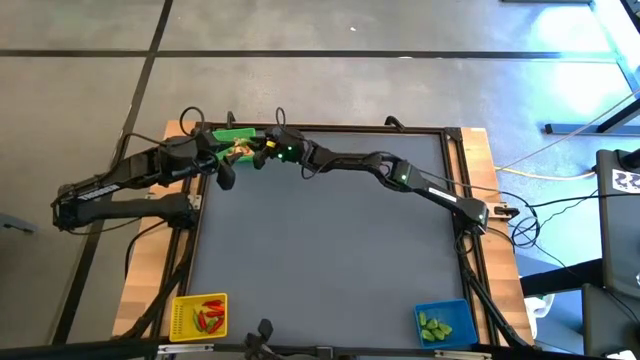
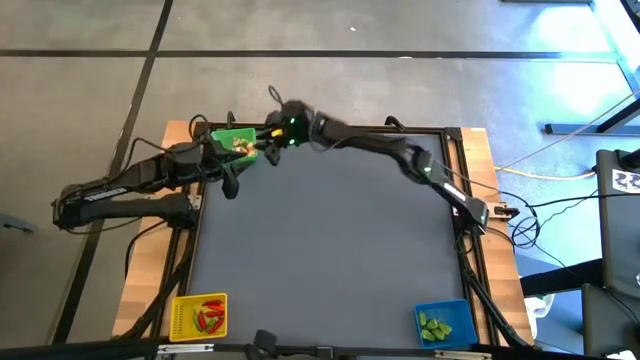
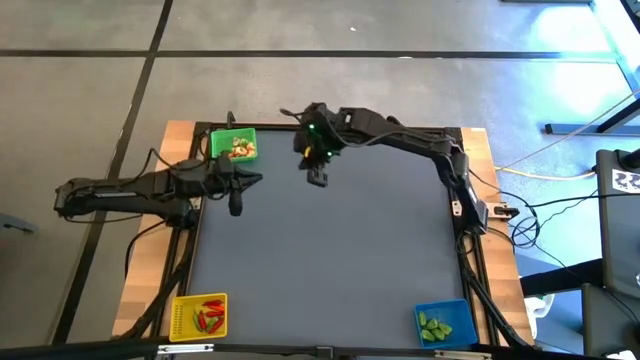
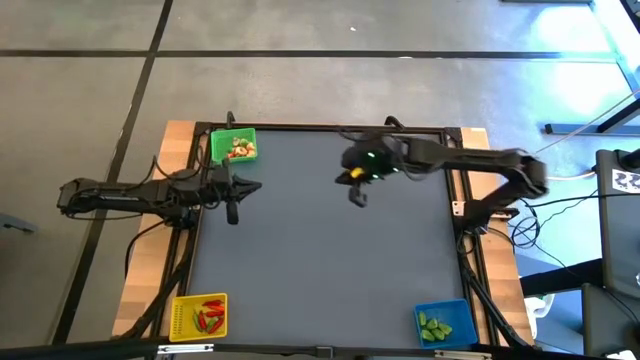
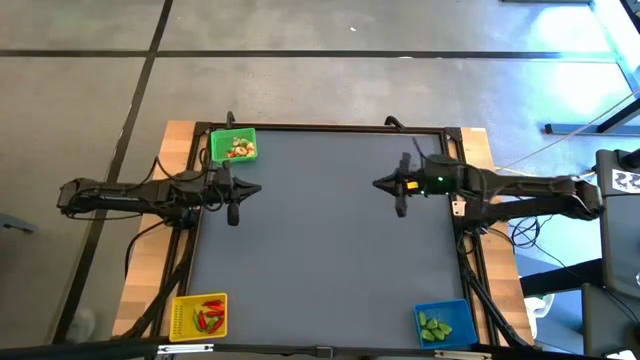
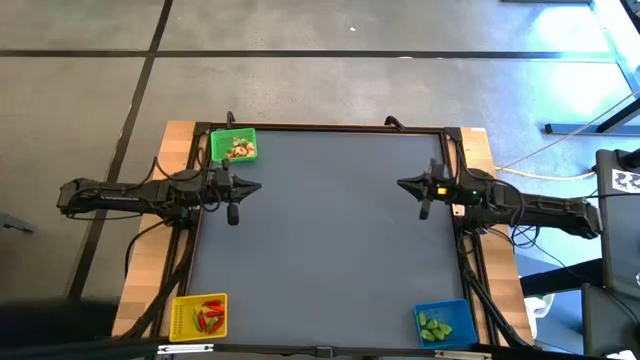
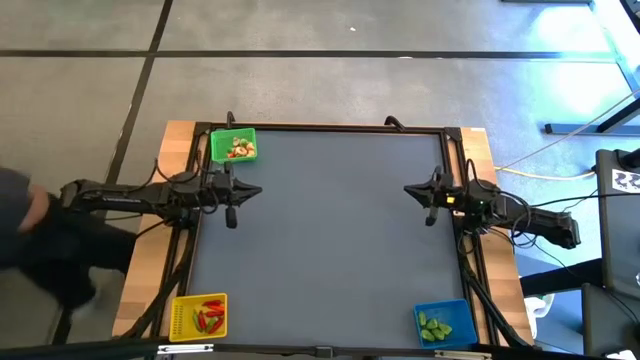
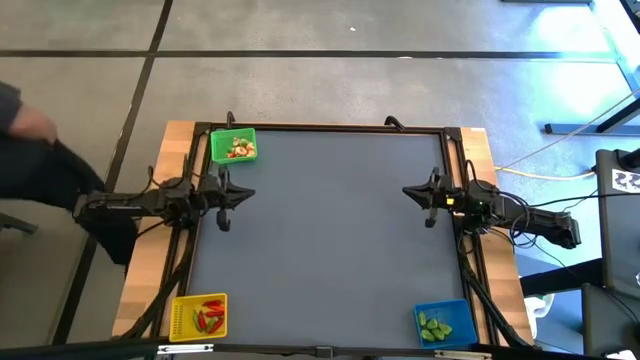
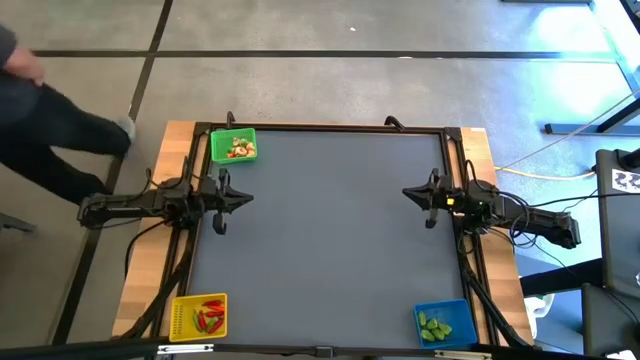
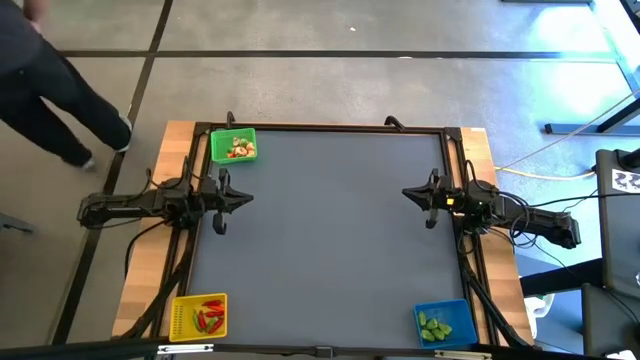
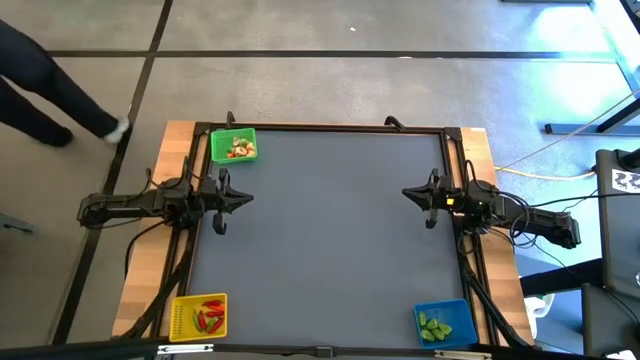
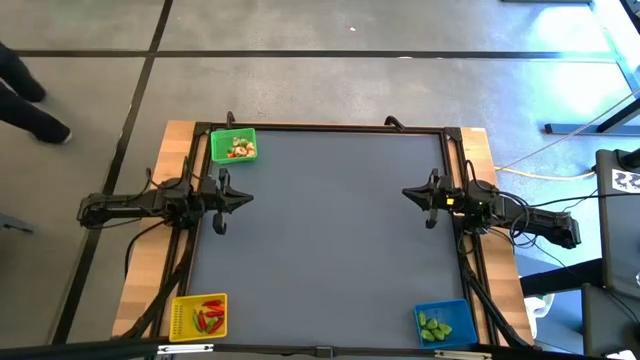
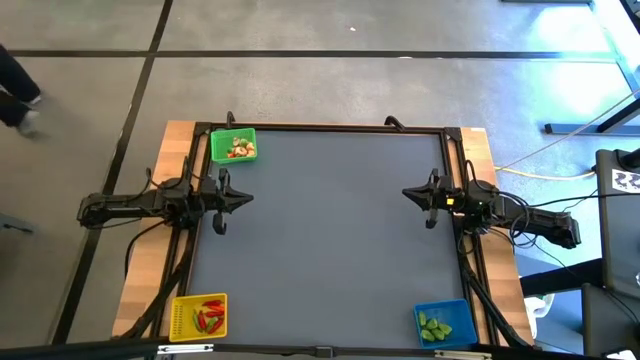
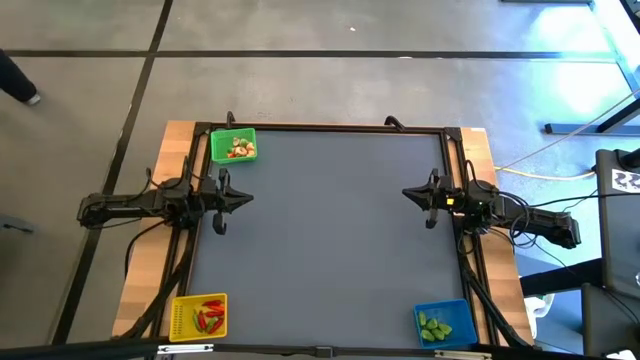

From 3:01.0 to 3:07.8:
Task: Sort produce into baskets
Return to Home Position

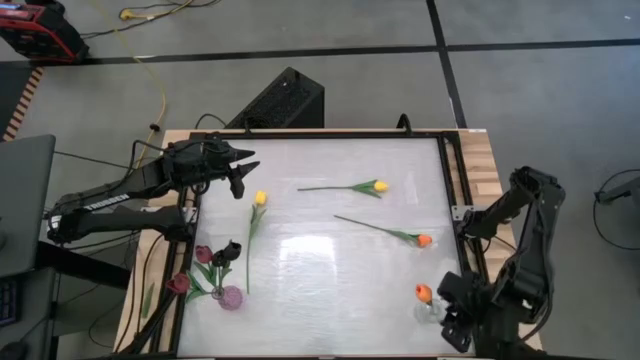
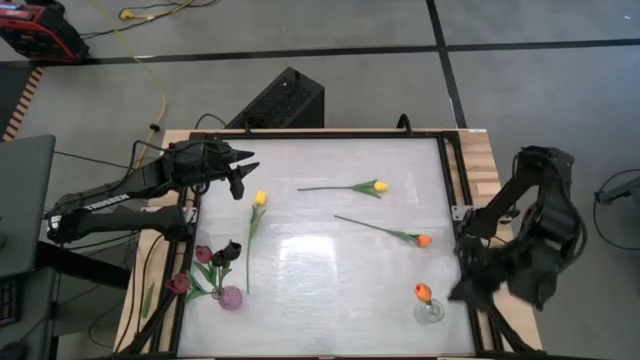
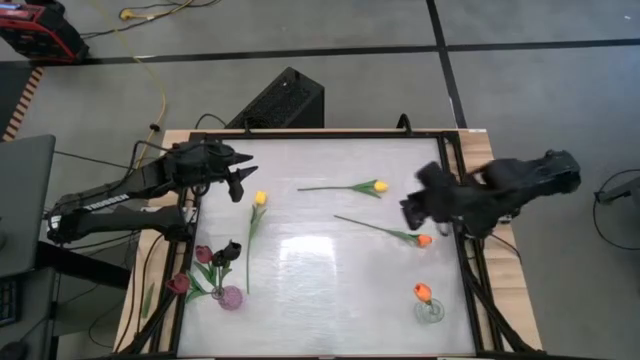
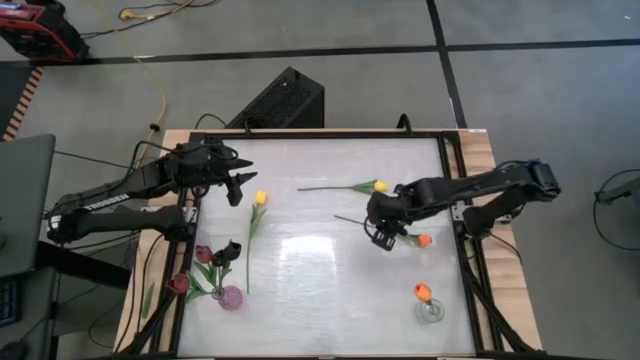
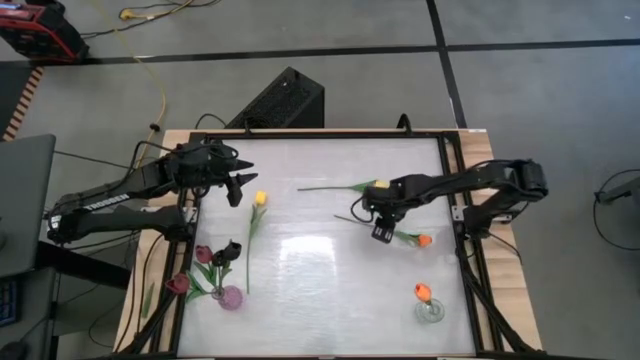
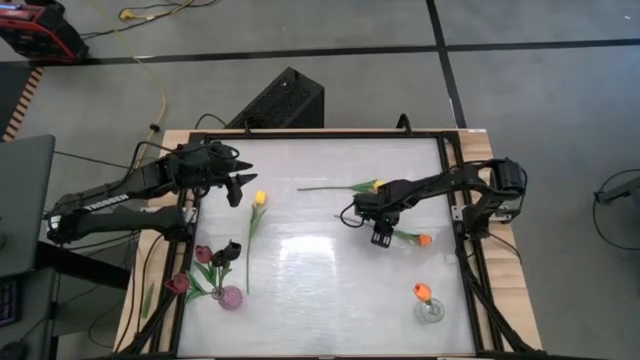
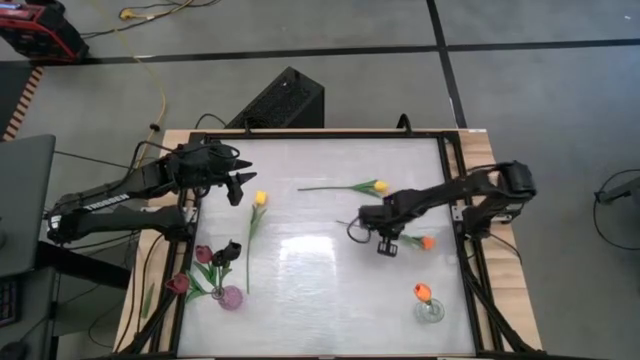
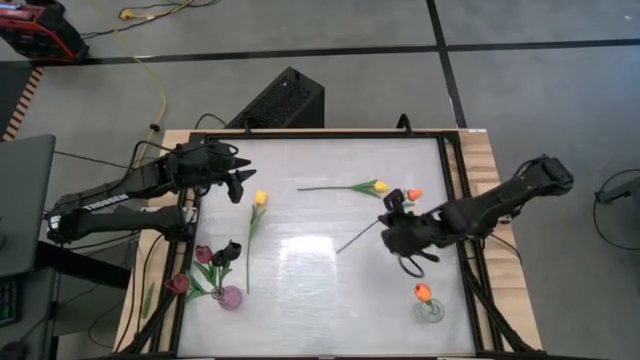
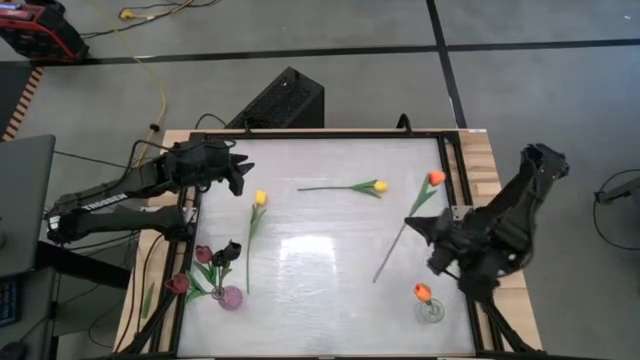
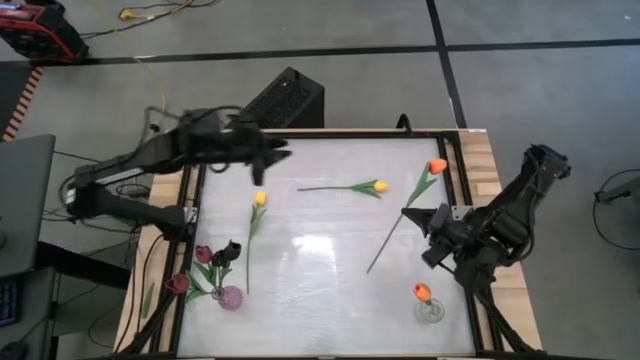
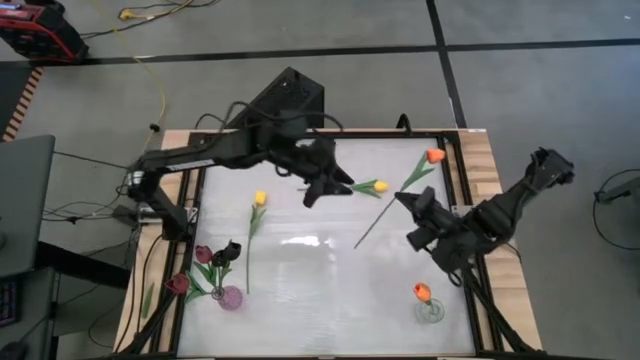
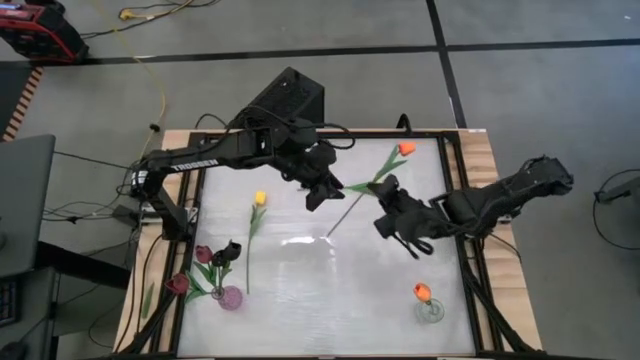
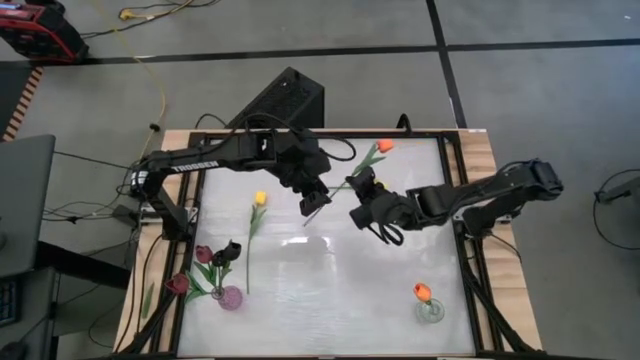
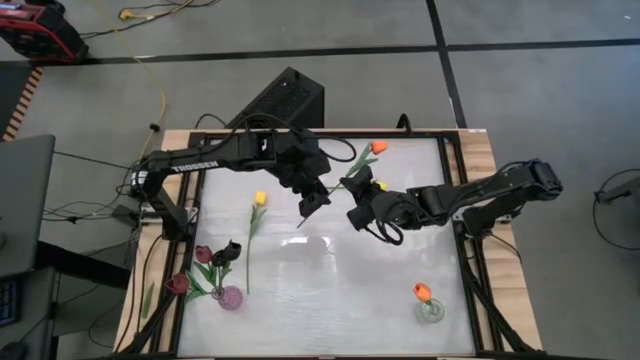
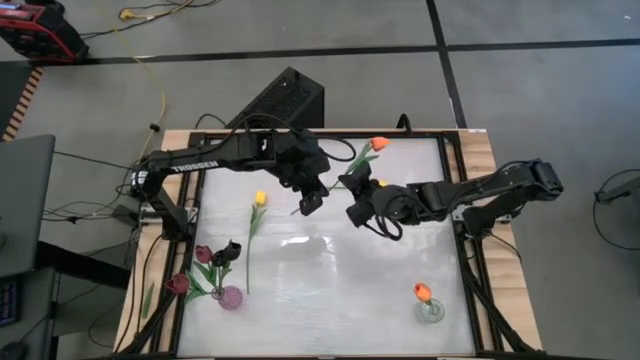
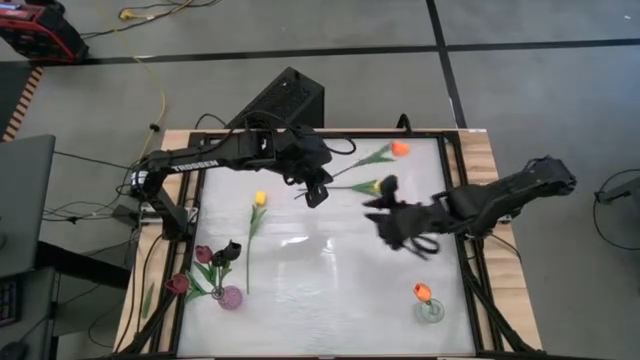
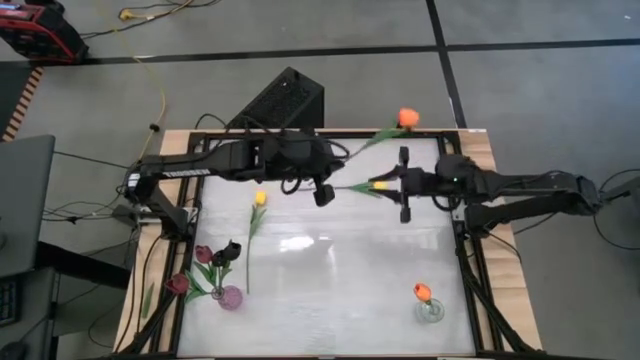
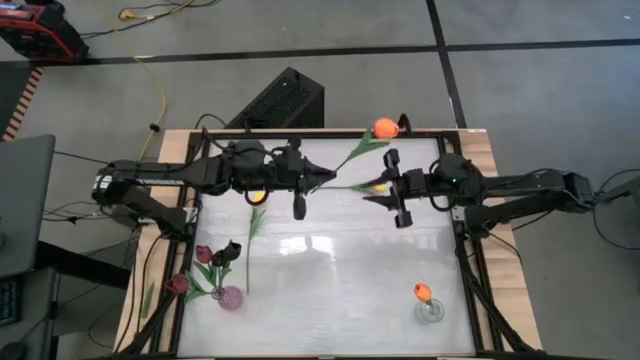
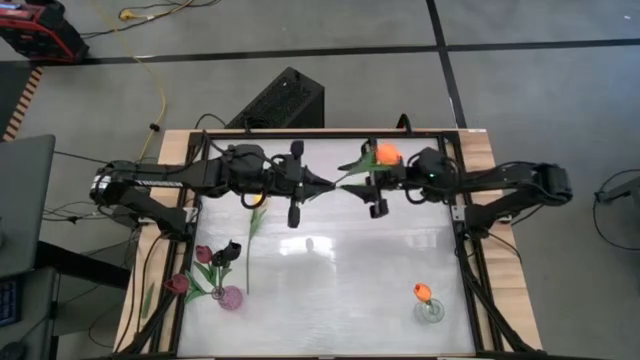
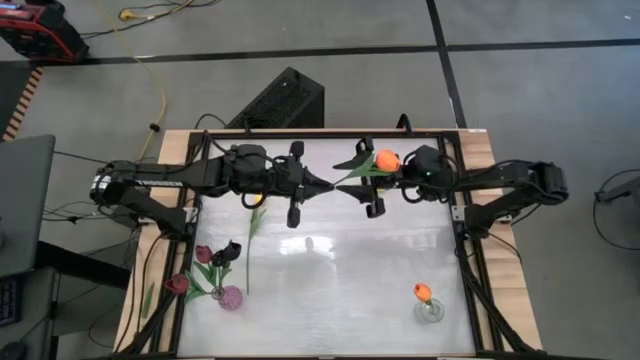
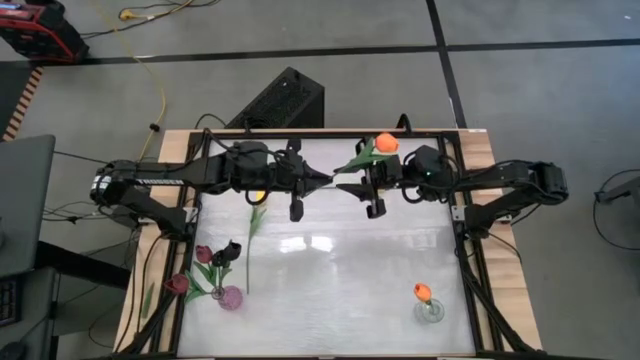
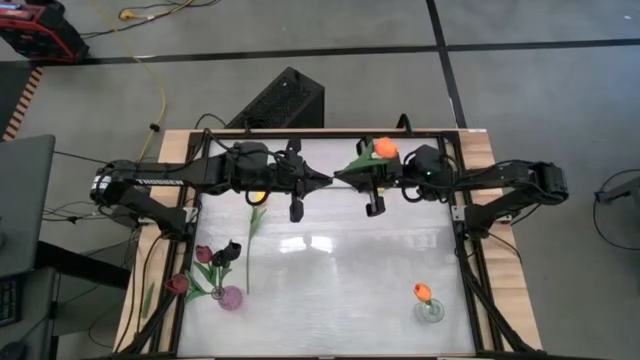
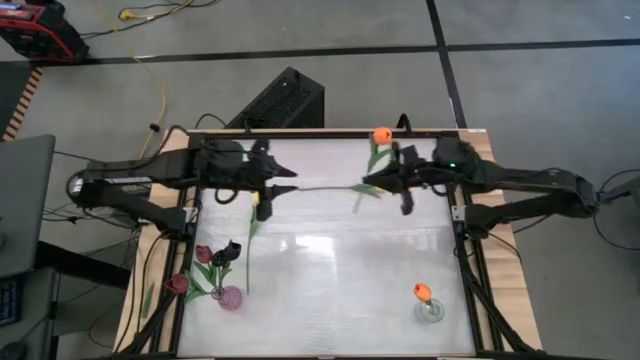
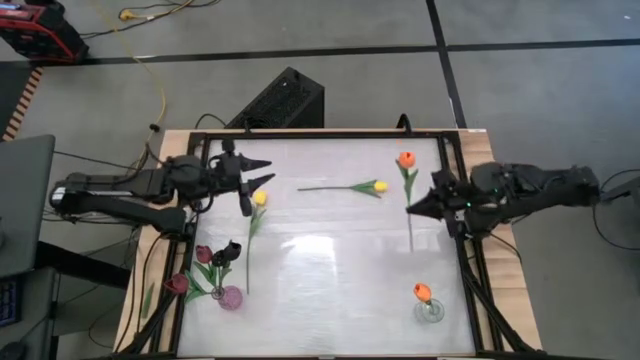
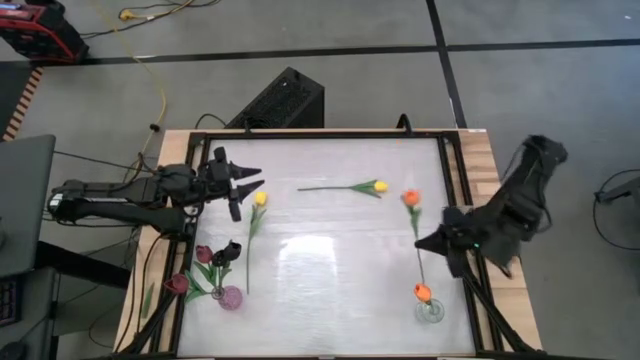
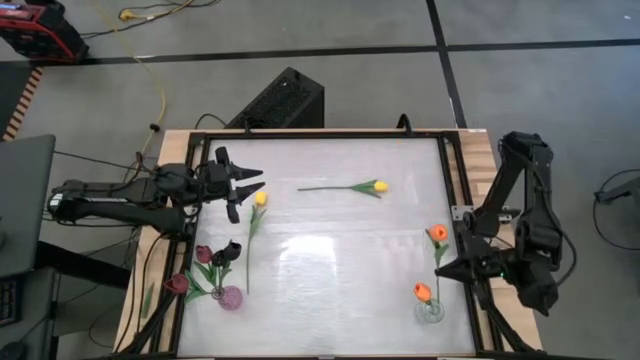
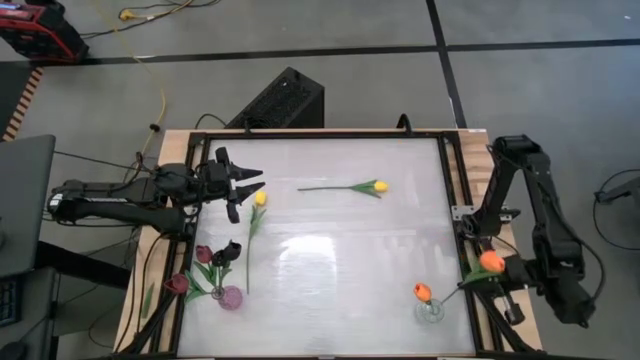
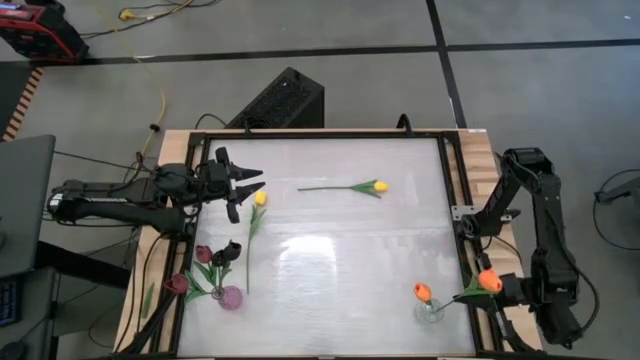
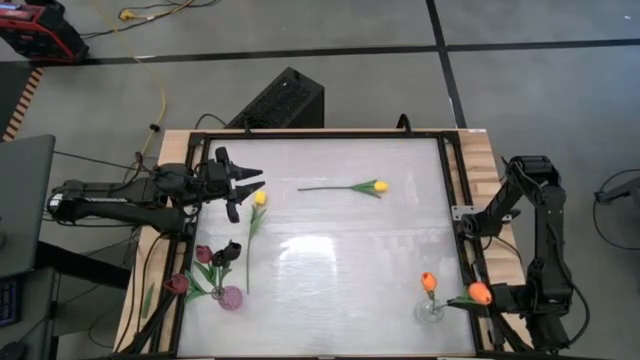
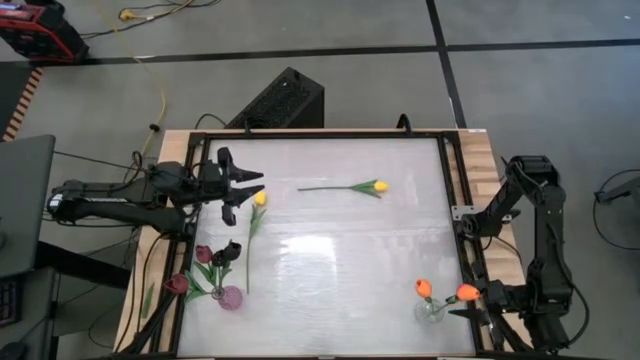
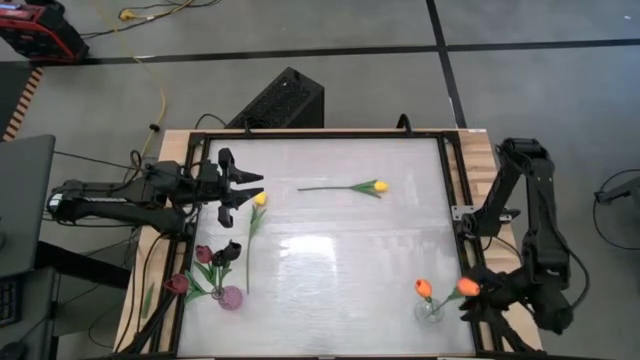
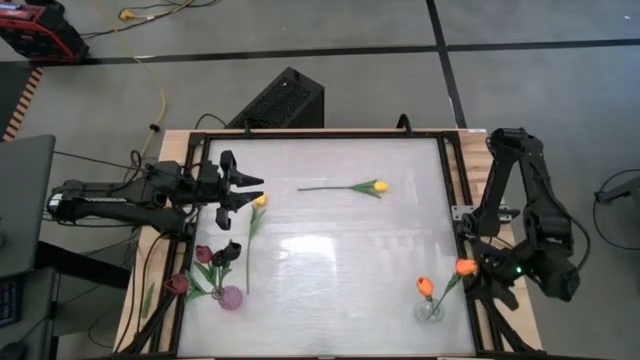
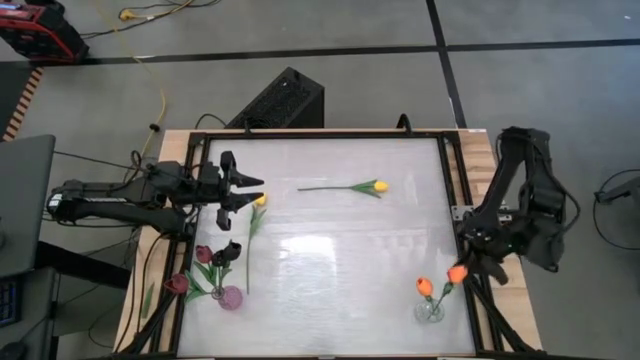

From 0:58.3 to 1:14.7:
Task: Sort flowers into vase by color
Put the orange flower into the transparent flower vase
